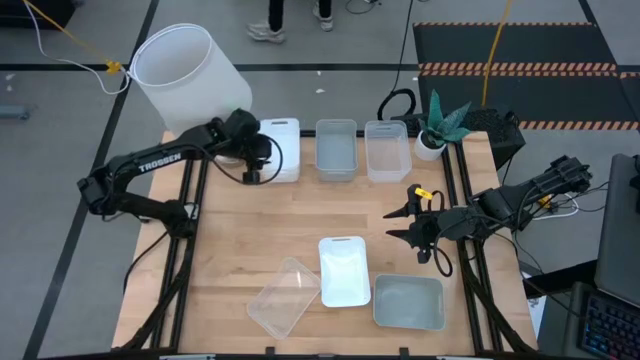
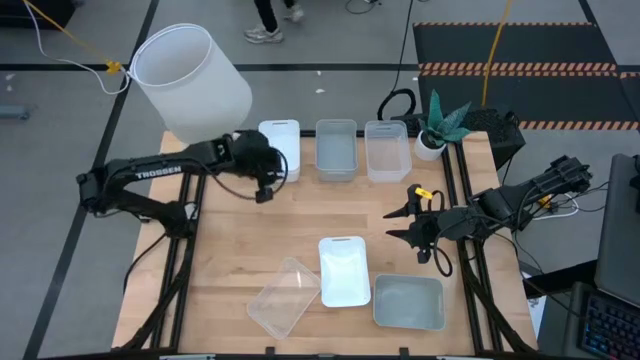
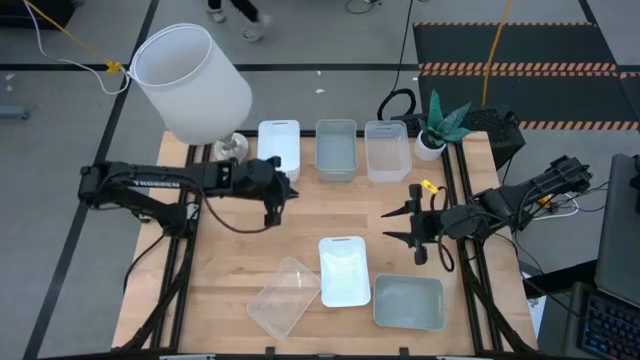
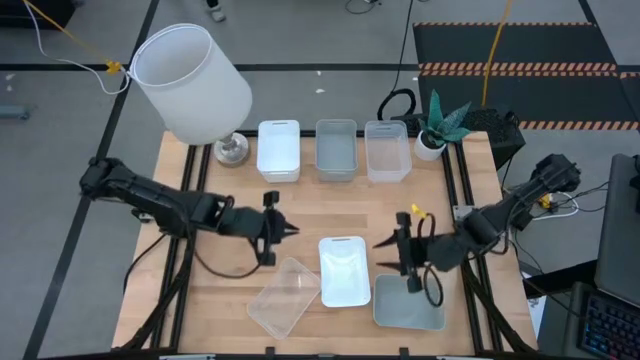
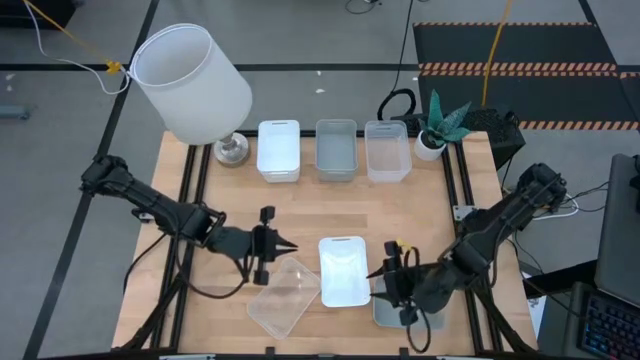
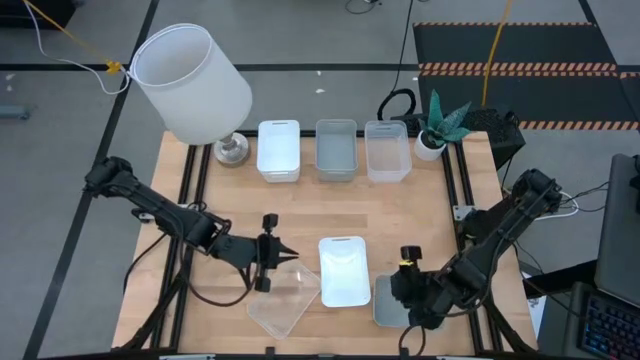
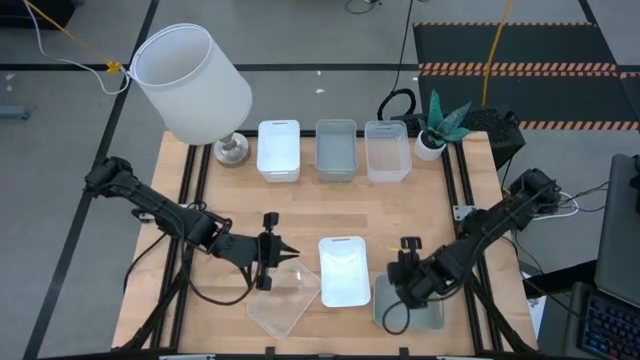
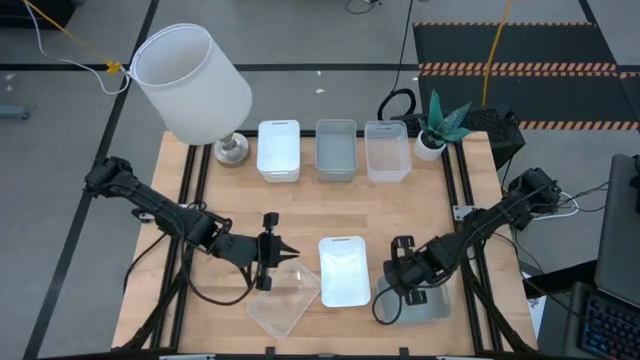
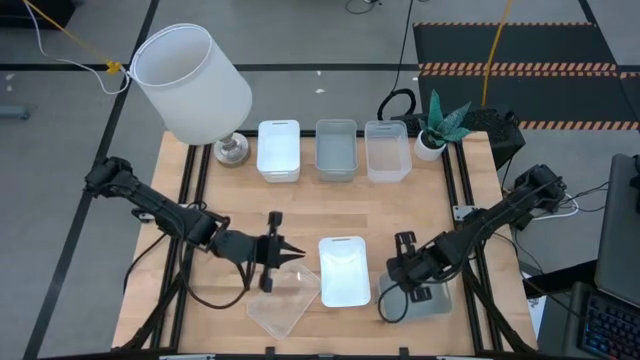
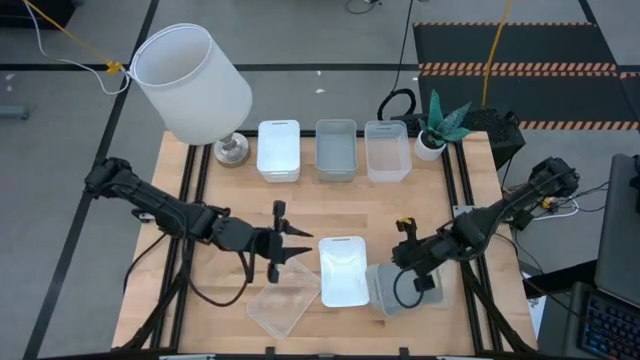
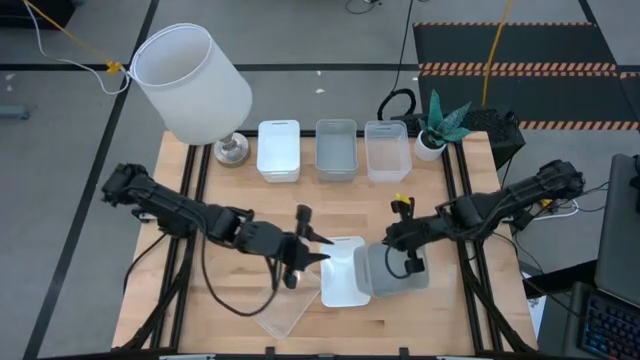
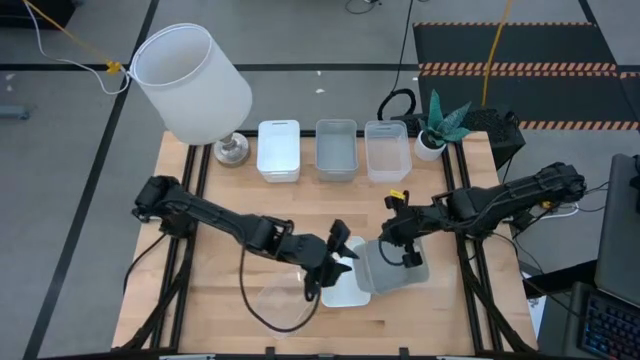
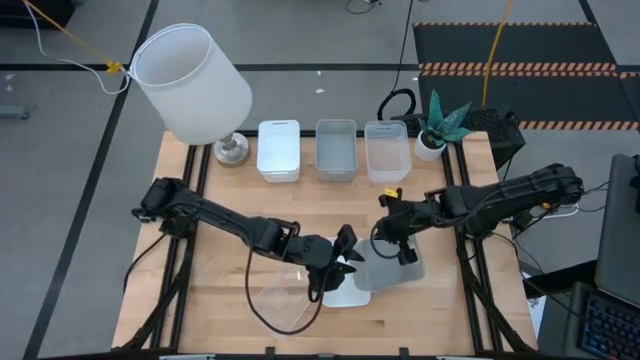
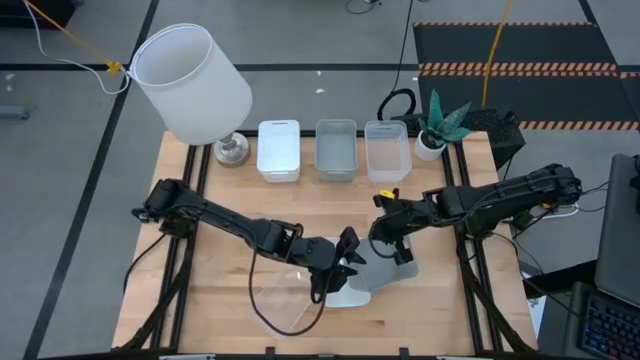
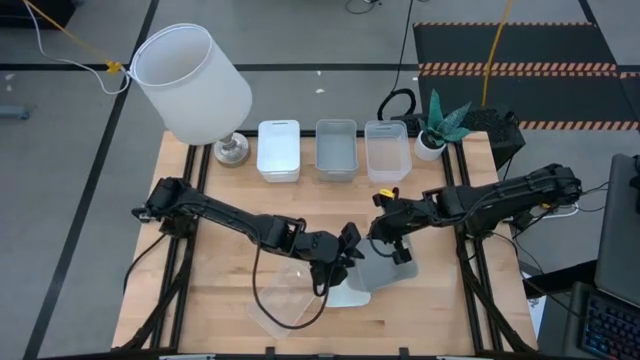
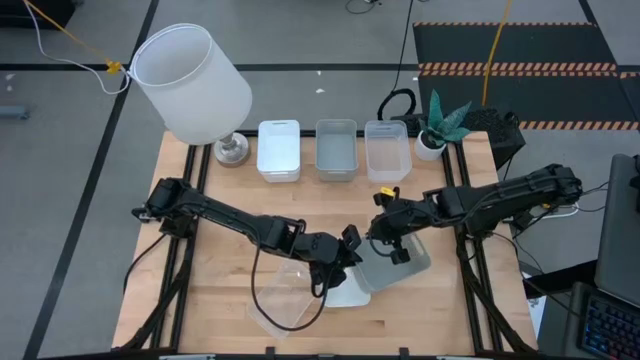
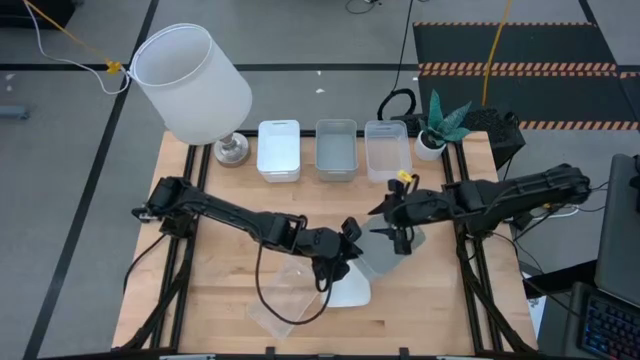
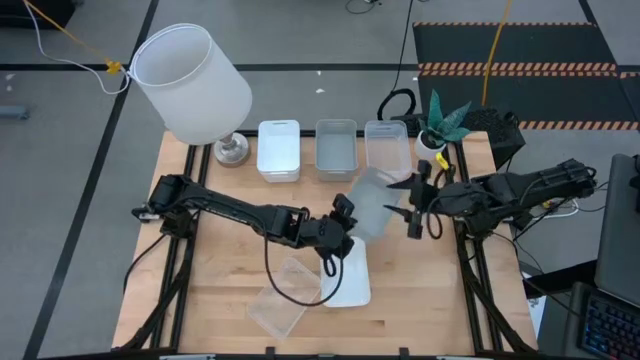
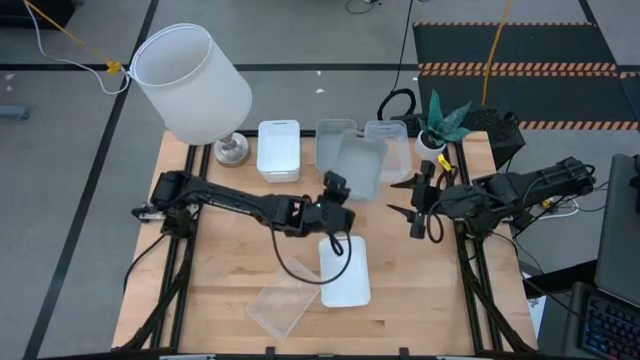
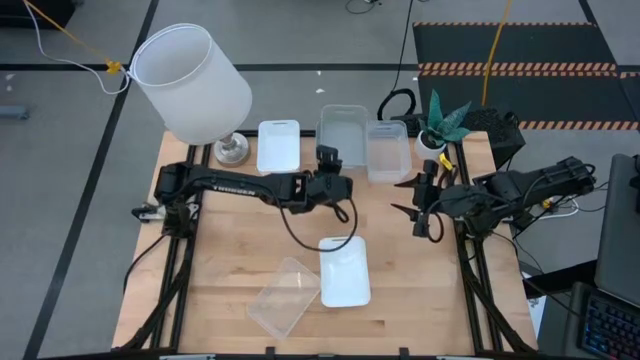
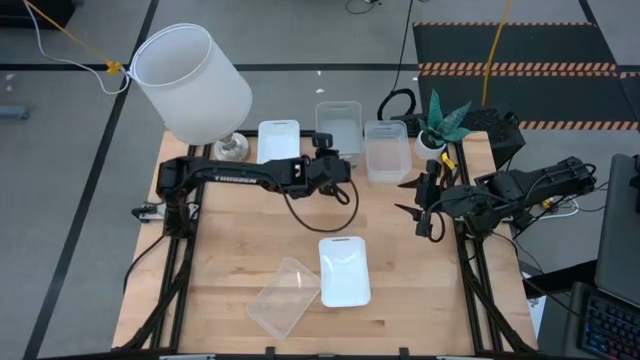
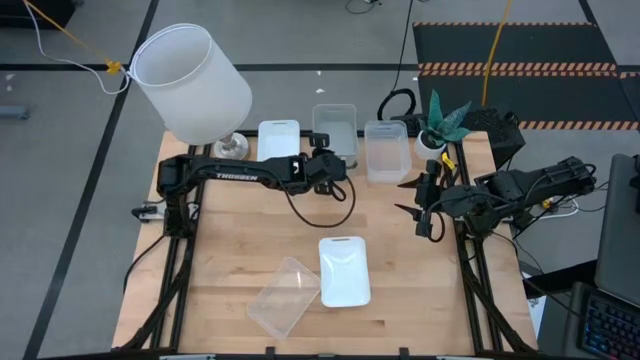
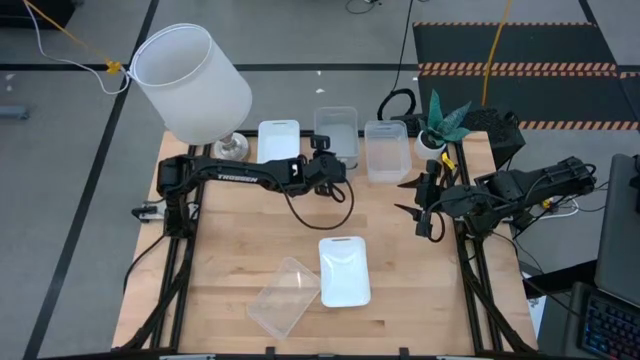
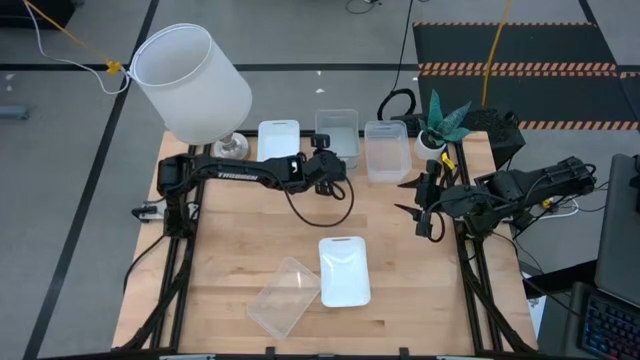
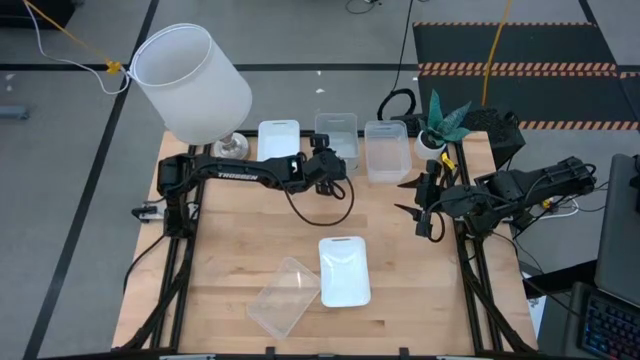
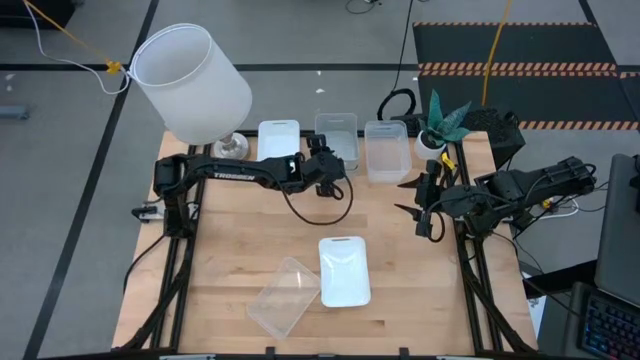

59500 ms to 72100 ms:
Stack the gray bin on the top middle stacked gray bins

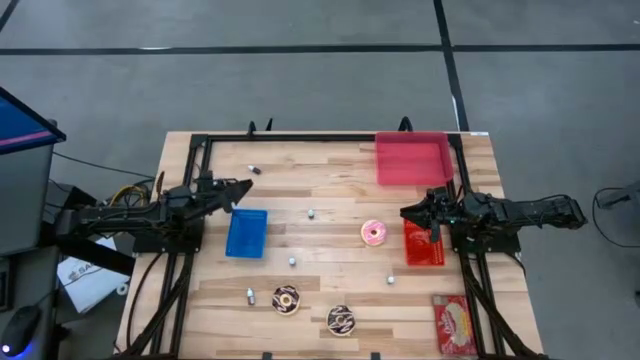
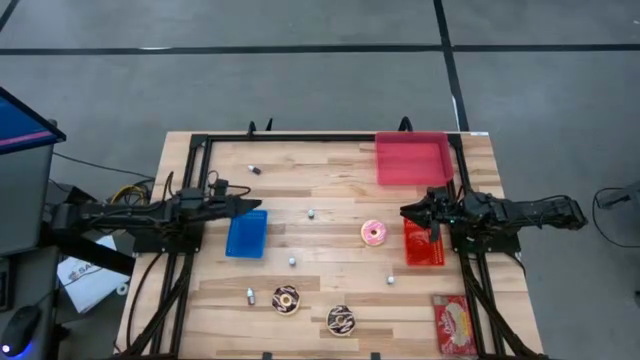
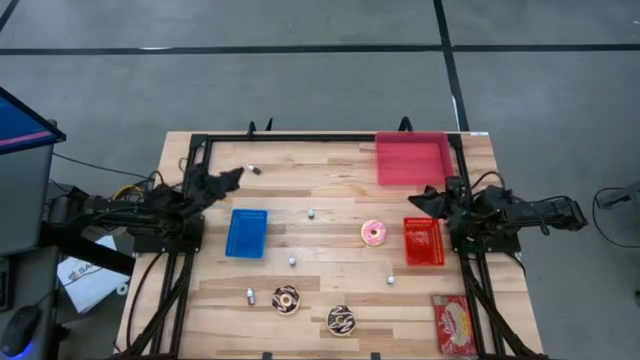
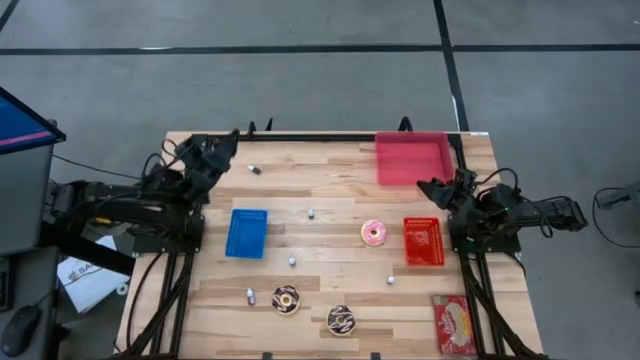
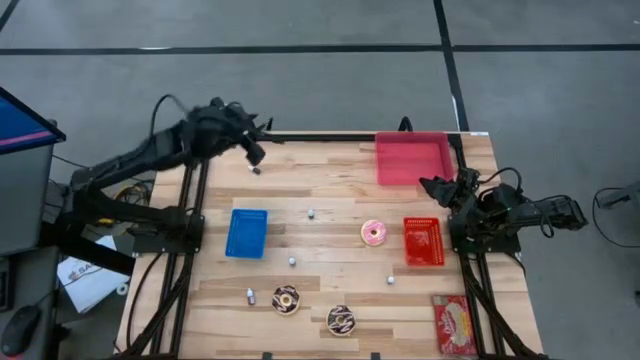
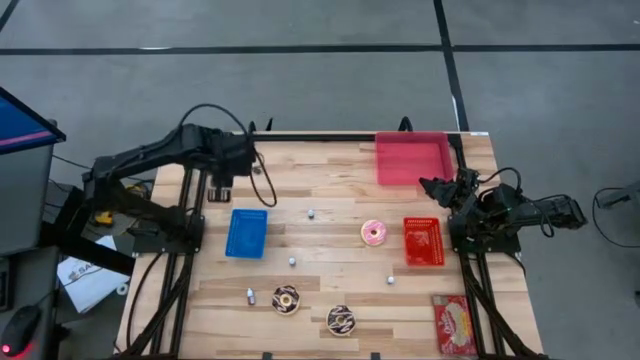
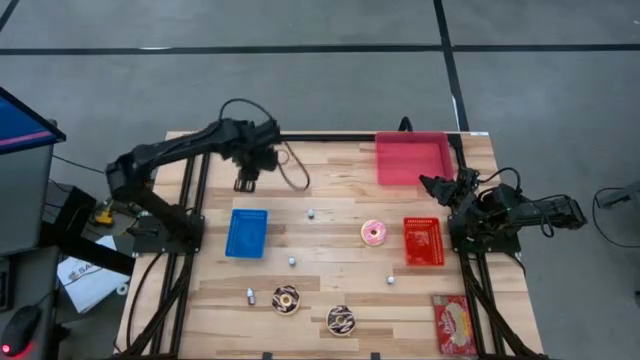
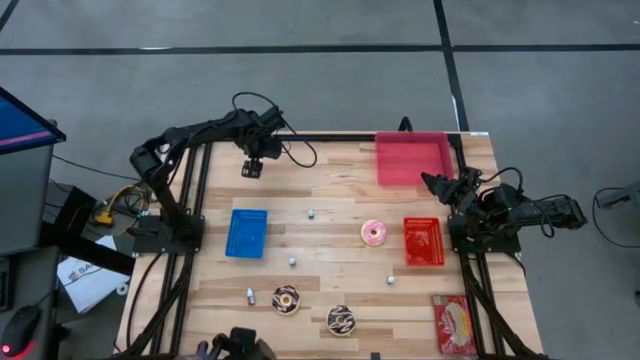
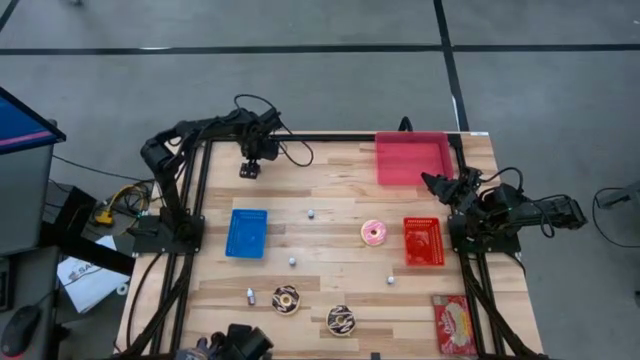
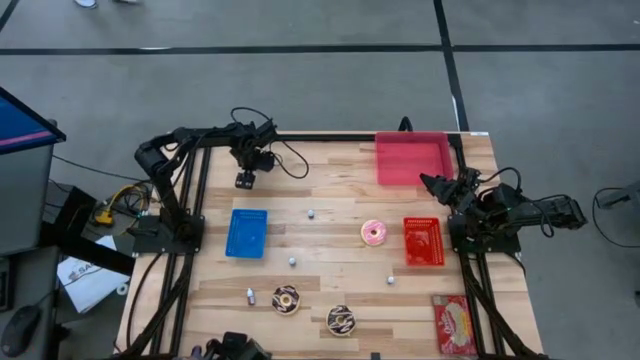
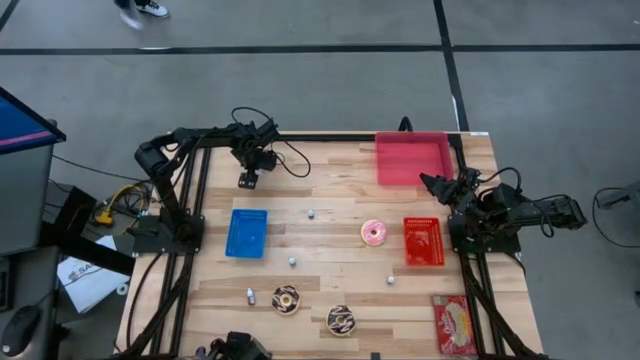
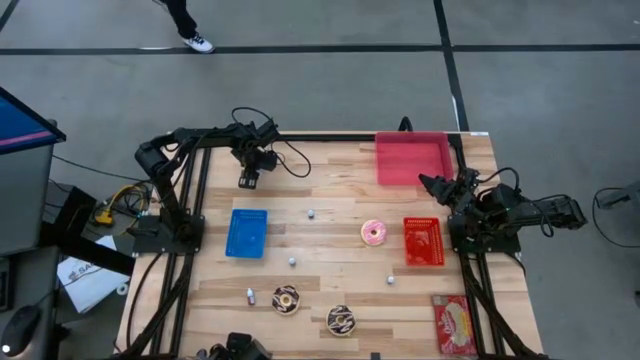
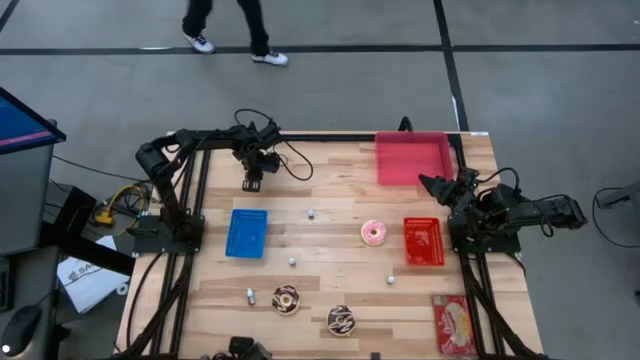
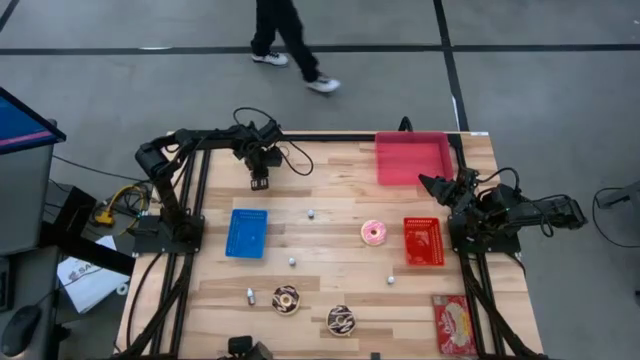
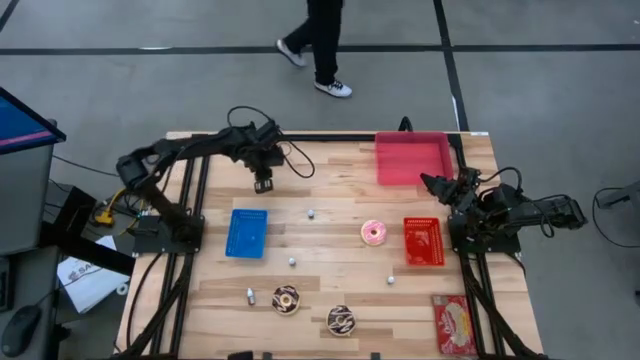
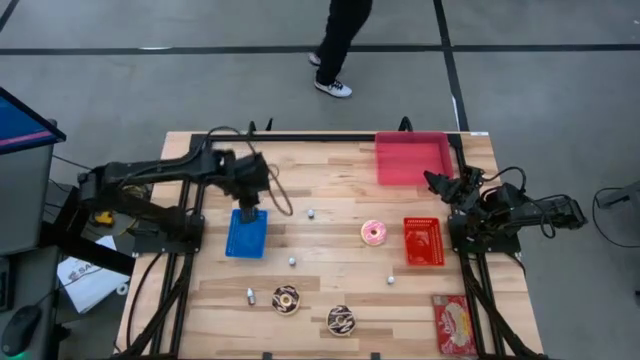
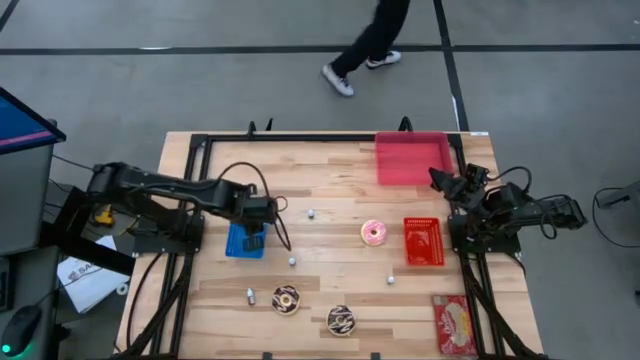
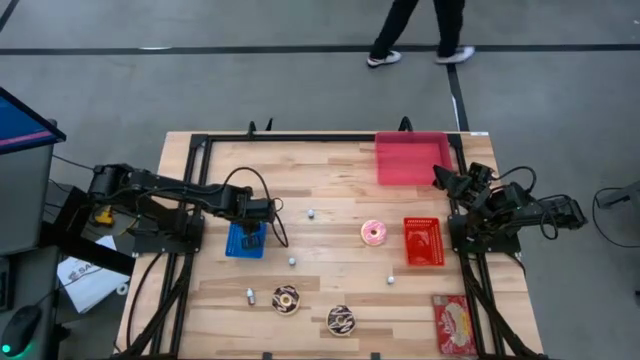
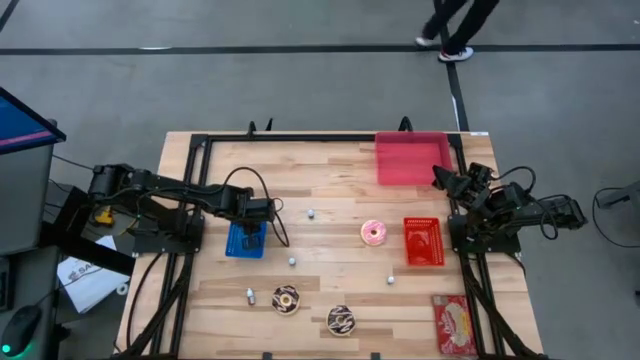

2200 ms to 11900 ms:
Put the black food coloring bottle into the blue bin
